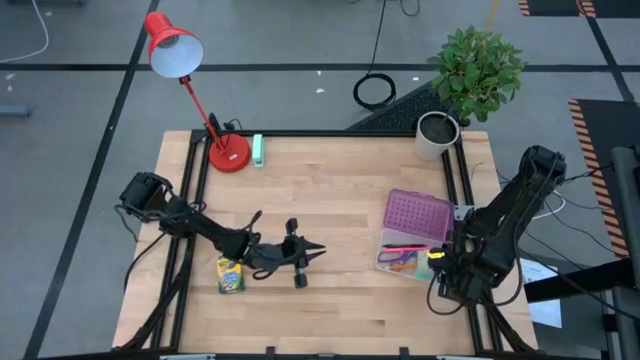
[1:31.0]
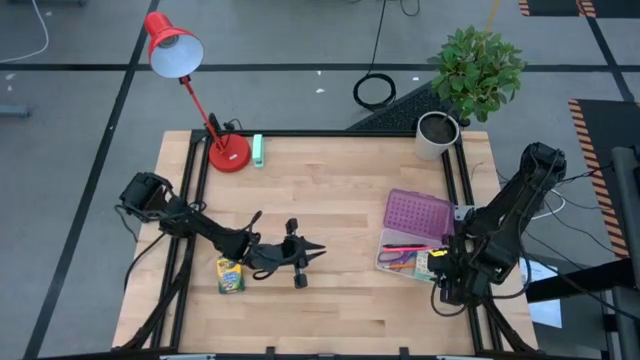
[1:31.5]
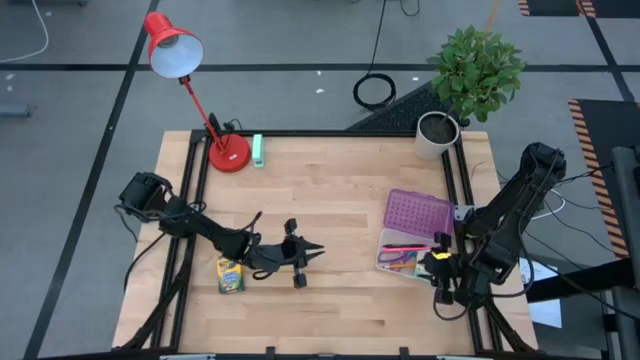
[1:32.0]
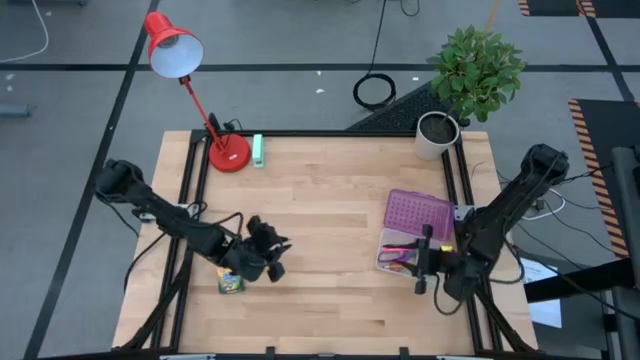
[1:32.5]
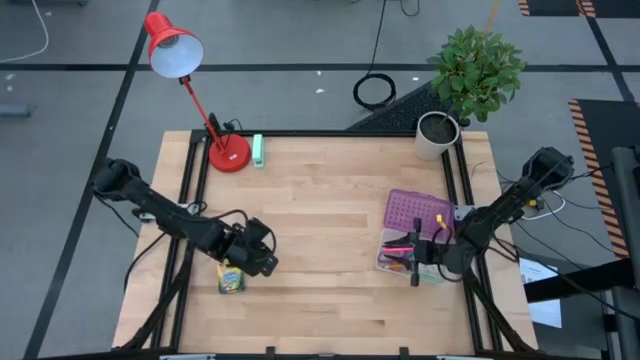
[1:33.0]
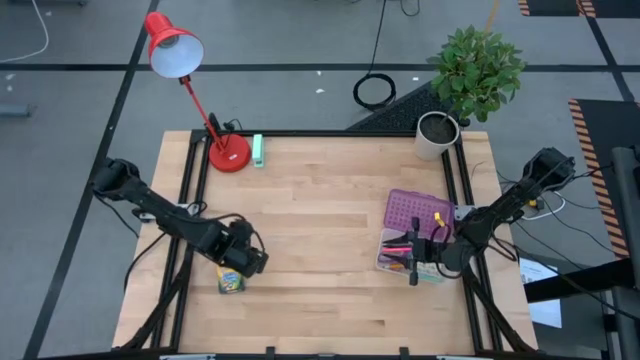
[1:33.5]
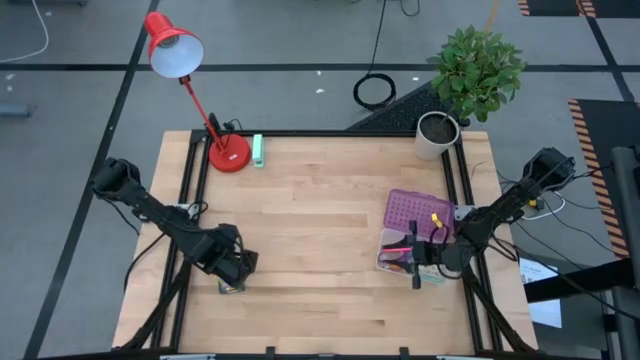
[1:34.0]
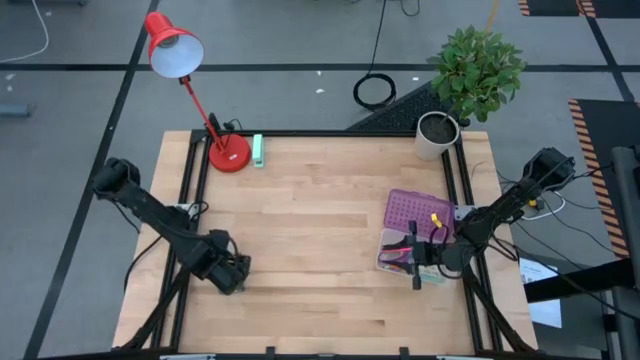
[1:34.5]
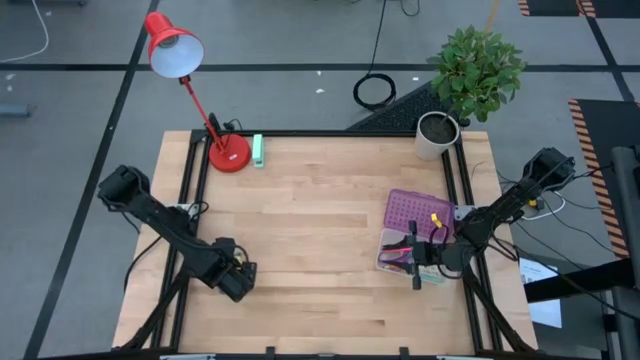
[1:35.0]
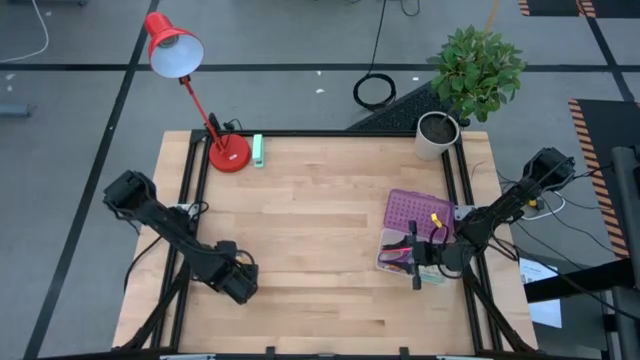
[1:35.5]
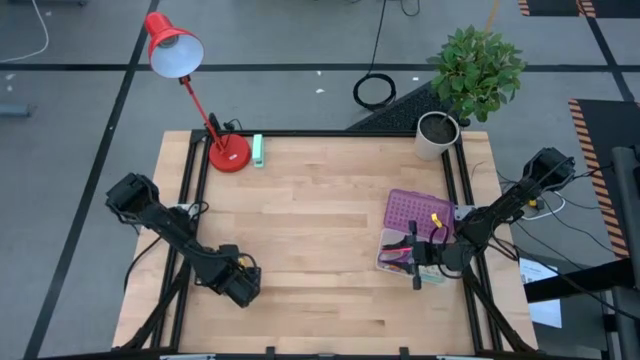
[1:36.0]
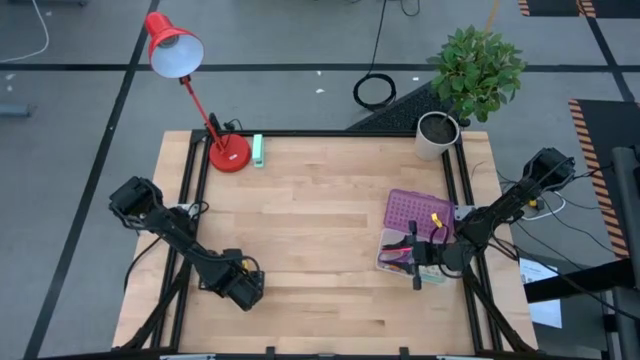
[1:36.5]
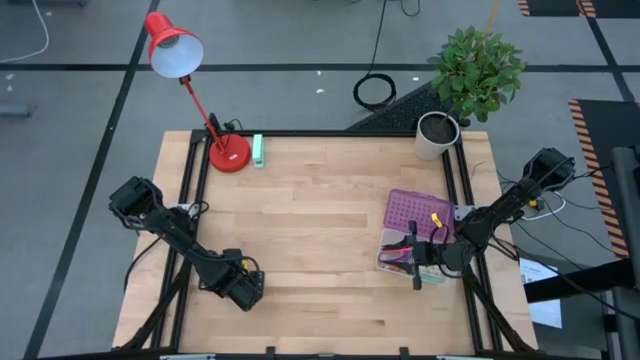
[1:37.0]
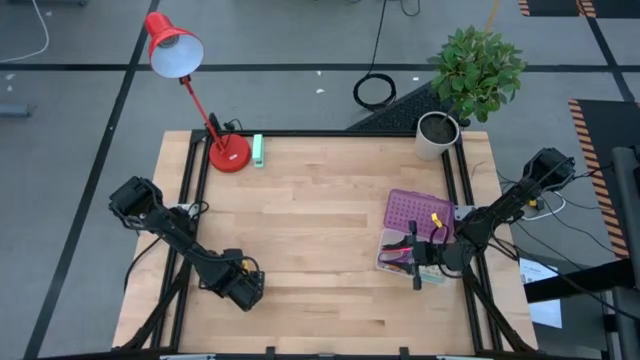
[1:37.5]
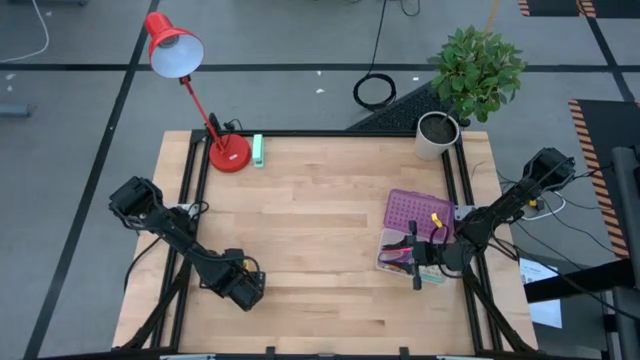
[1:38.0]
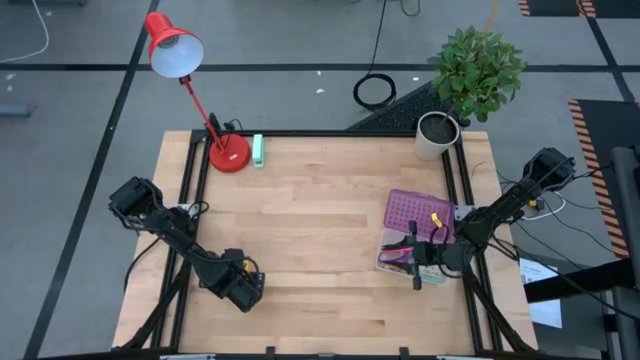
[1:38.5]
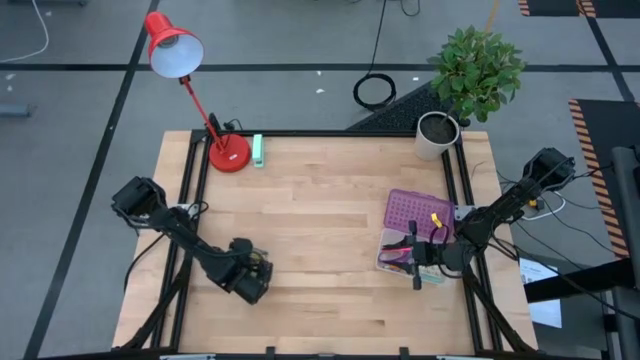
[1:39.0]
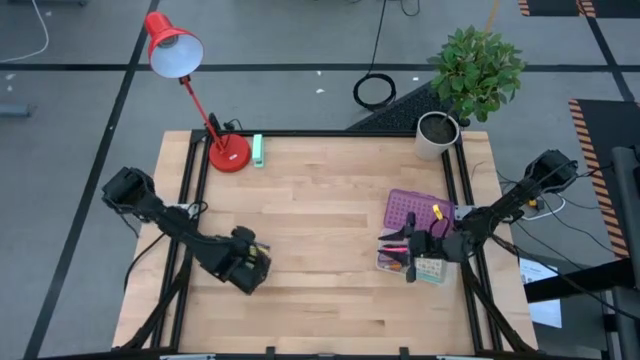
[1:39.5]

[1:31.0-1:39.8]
Task: Pack school essentials
Put the crayon box into the supply box

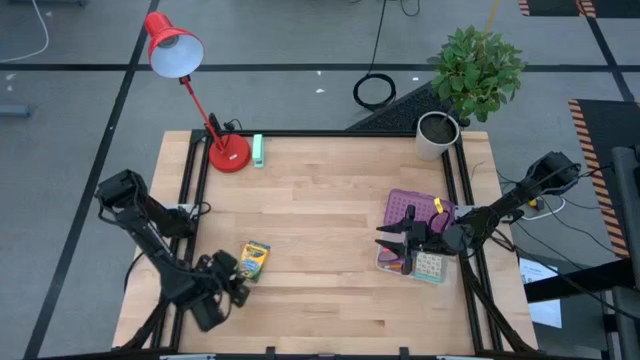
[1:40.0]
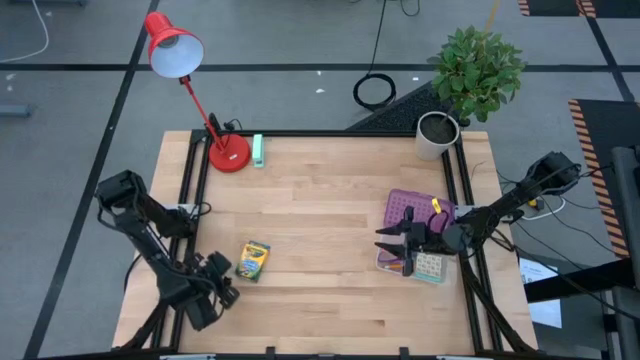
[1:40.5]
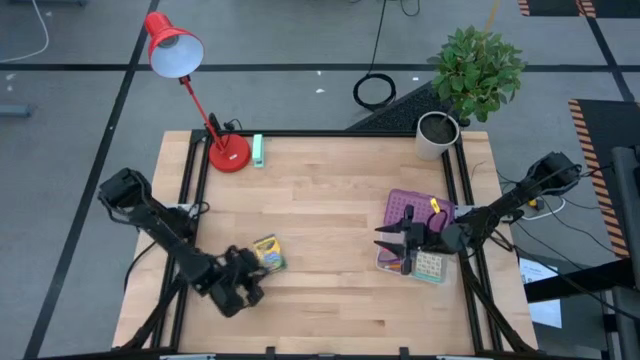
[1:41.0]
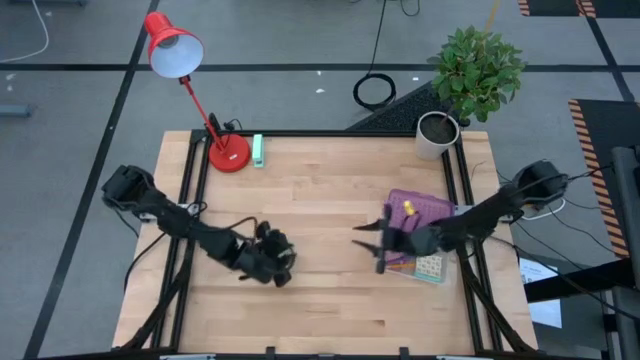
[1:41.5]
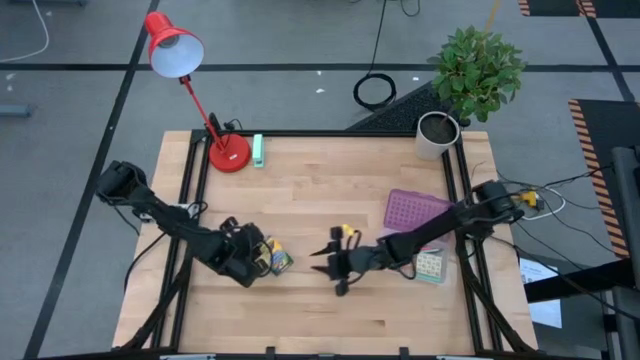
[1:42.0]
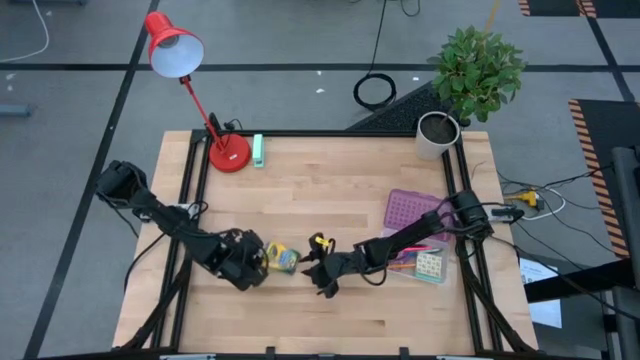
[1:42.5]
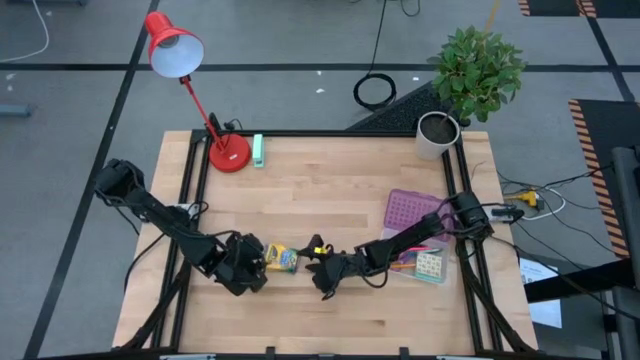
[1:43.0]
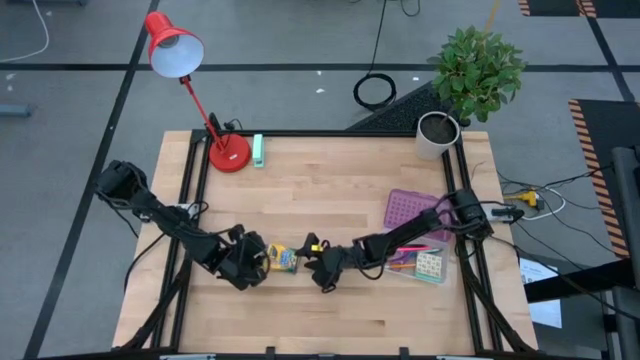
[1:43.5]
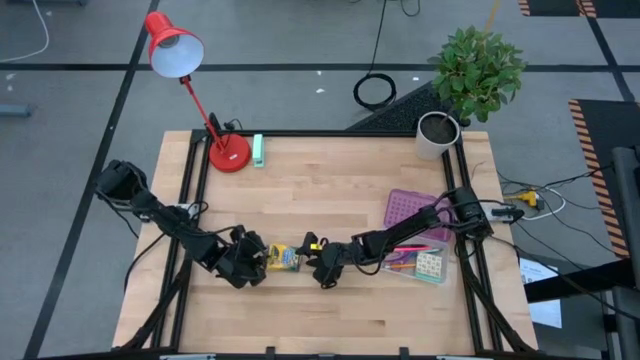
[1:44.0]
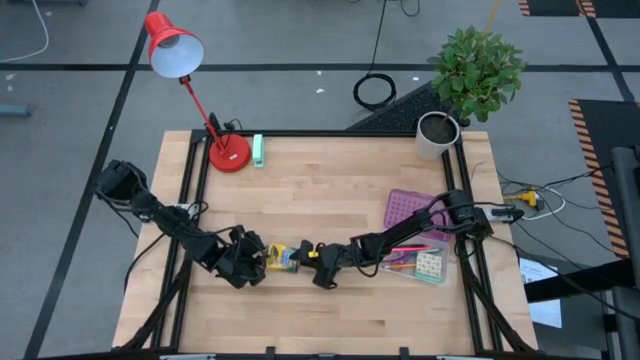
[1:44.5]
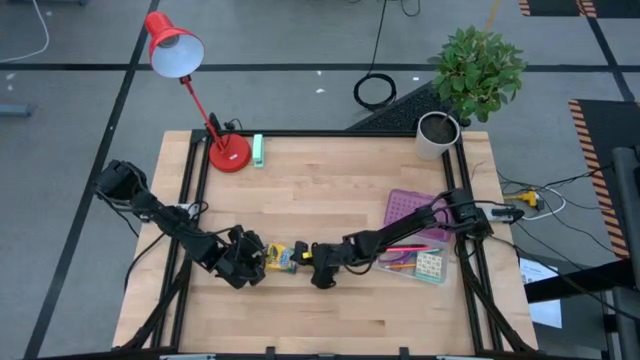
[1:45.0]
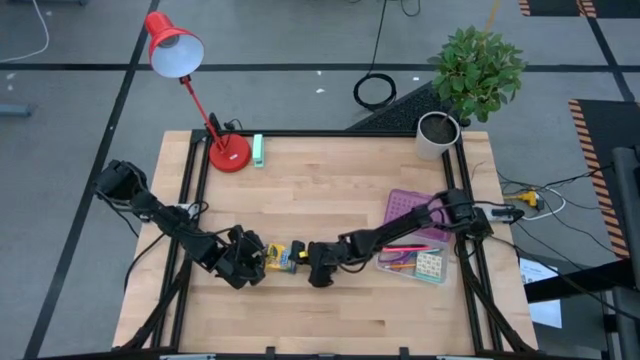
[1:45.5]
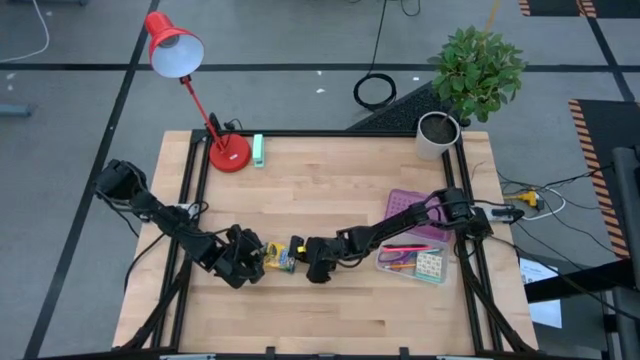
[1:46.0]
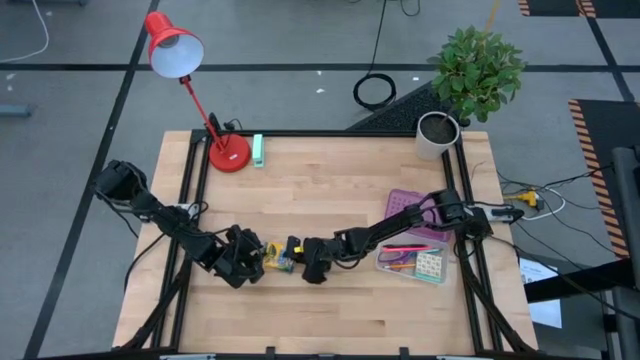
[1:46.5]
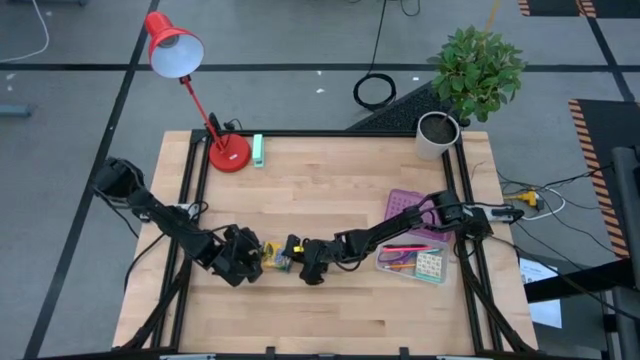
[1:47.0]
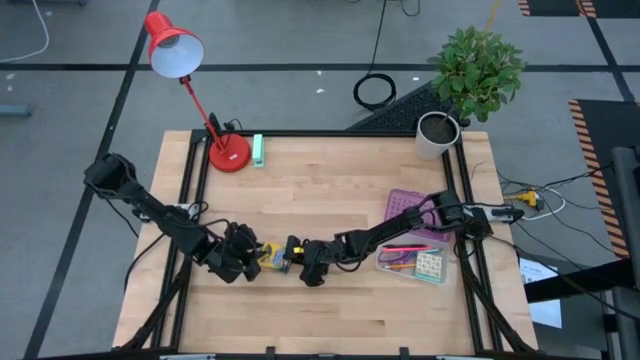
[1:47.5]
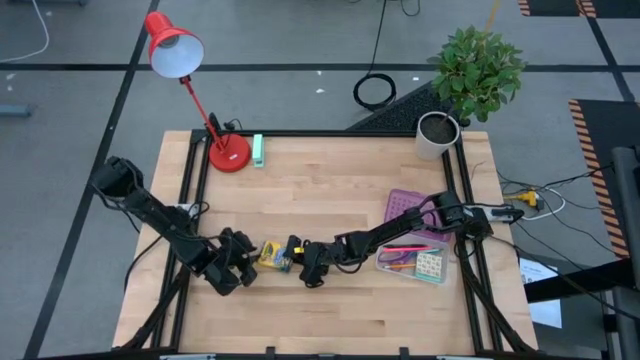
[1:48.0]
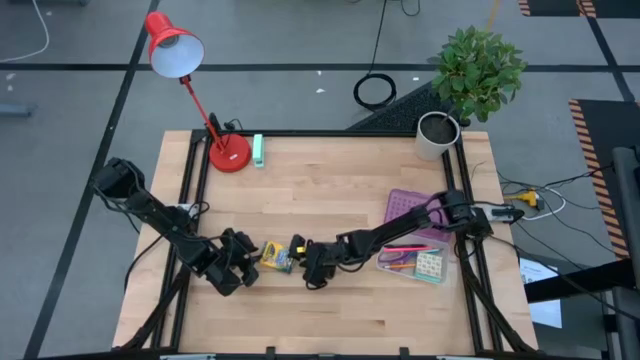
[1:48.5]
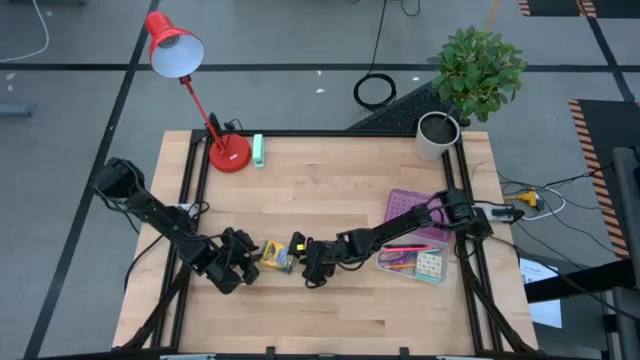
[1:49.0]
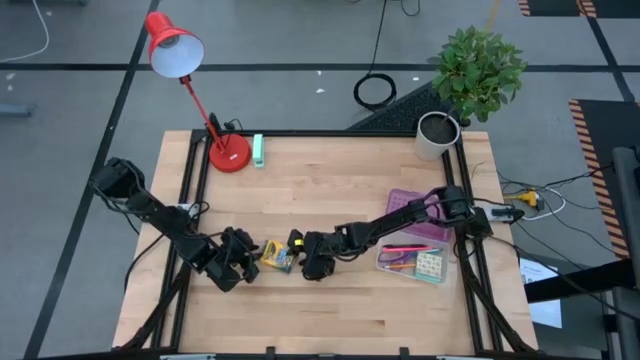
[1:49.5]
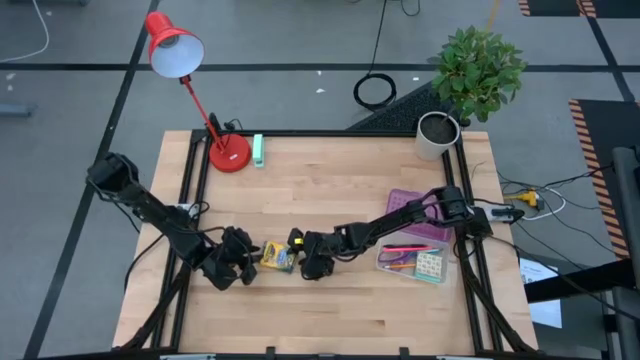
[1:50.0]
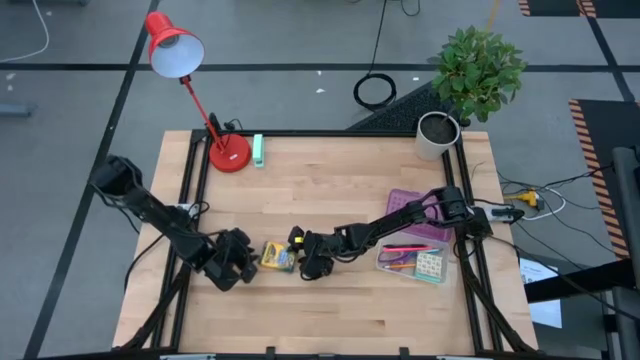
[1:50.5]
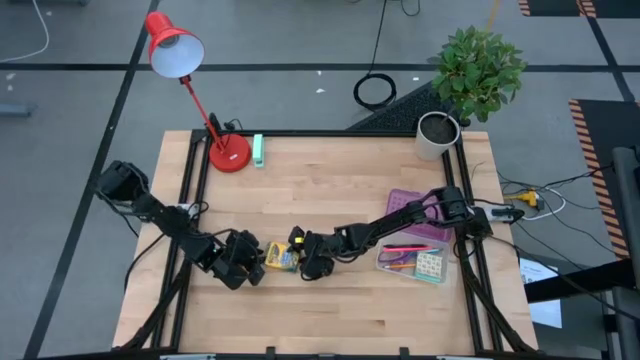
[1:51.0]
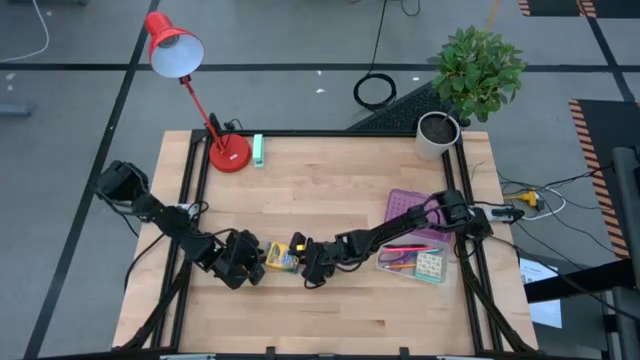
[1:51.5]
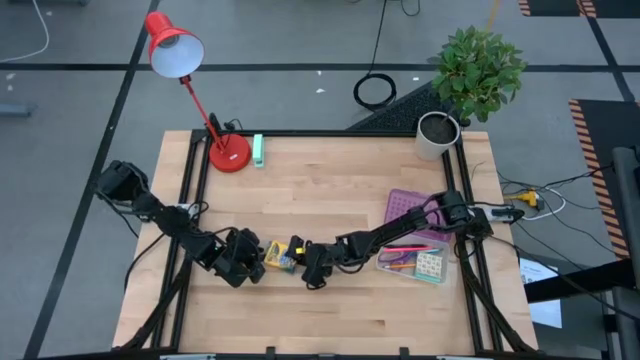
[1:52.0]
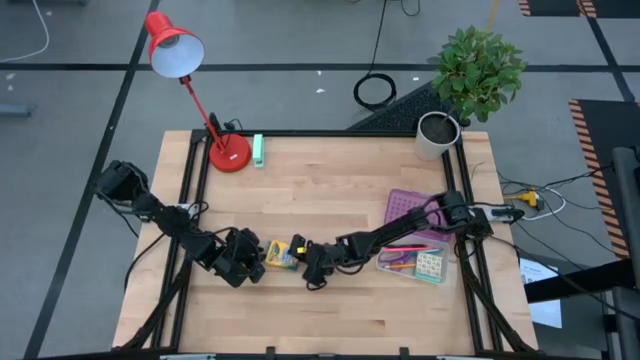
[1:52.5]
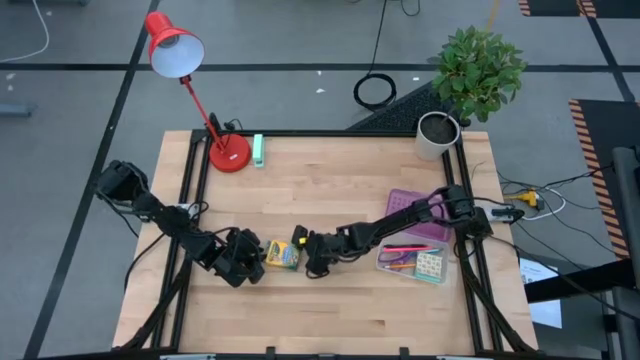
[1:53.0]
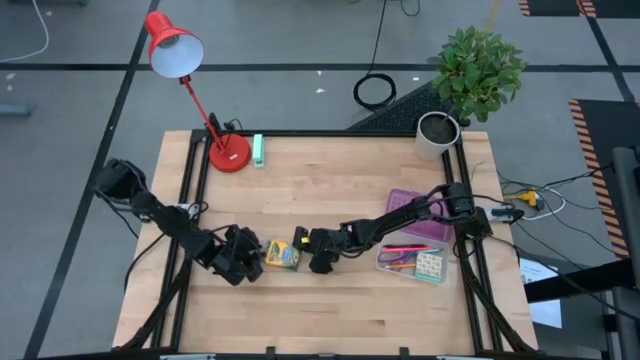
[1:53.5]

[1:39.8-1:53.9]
Put the crayon box into the supply box
